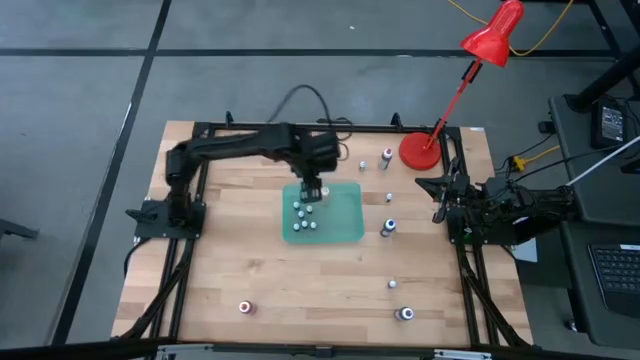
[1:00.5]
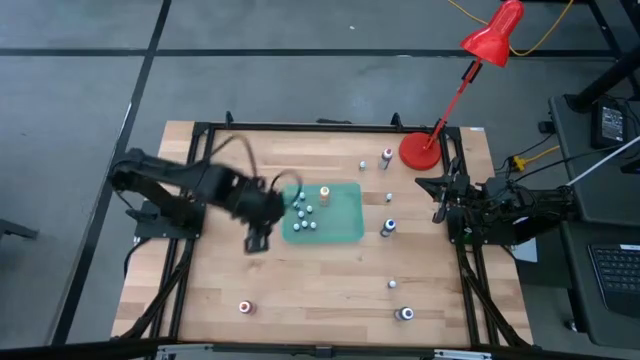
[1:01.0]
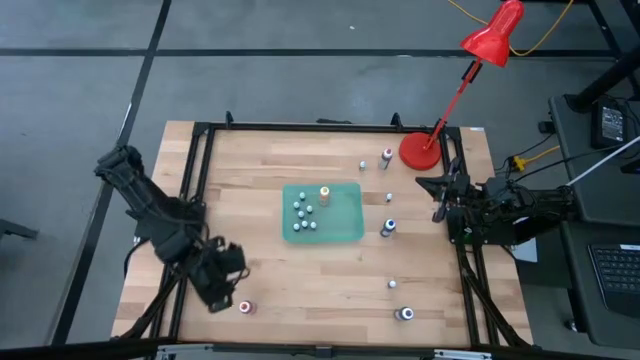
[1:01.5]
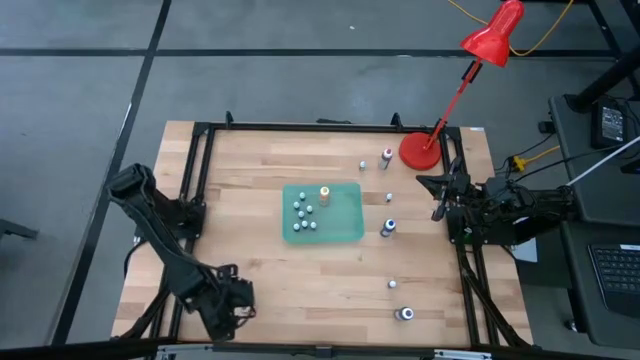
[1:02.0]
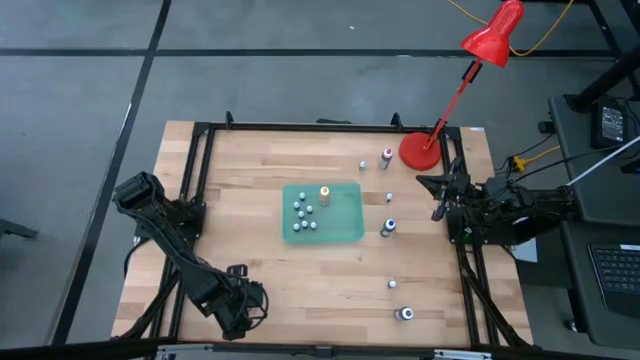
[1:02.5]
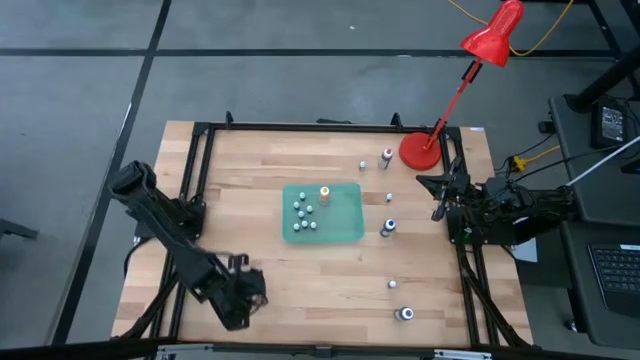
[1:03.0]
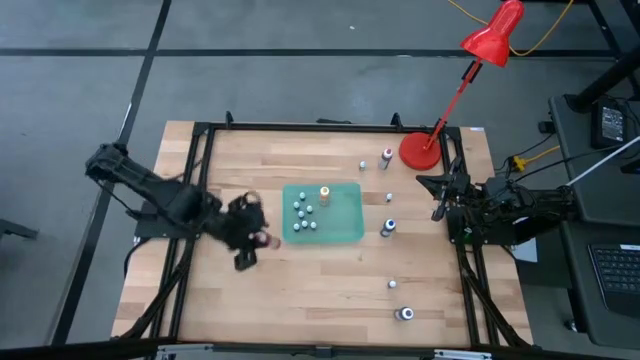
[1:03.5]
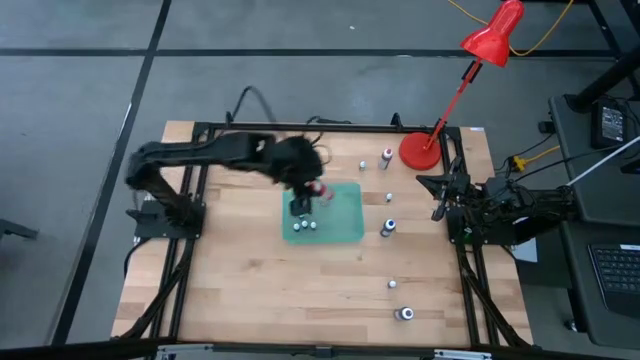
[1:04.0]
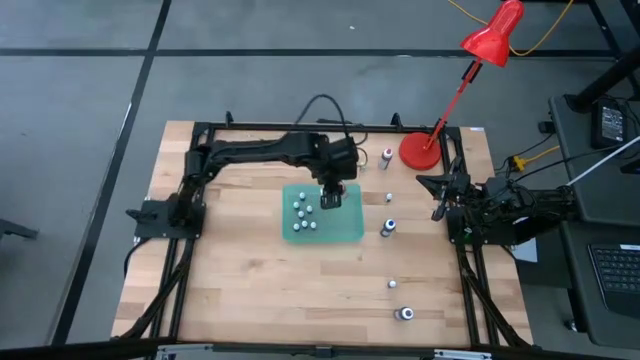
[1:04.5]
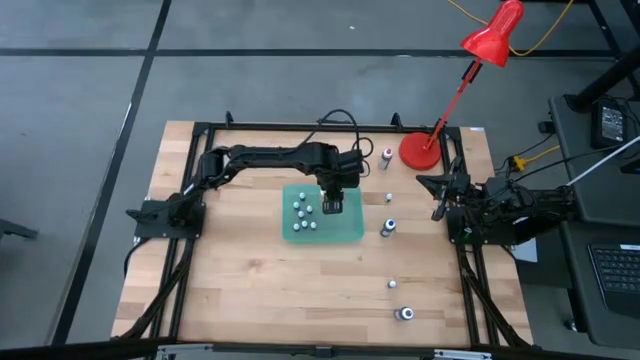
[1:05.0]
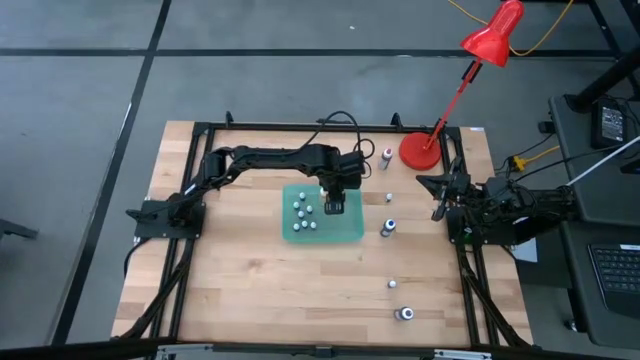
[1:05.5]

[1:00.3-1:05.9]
Task: Pick & Place food coloring
Put the big orange food coloring bottle into the green bin

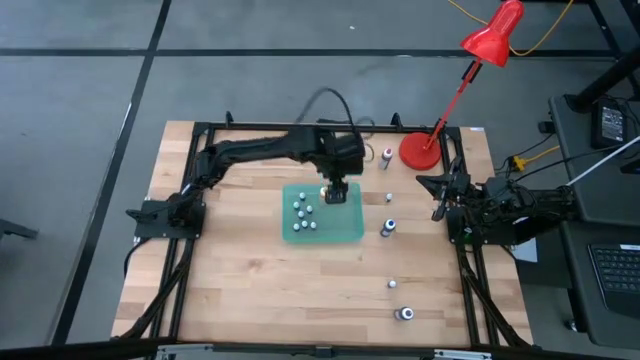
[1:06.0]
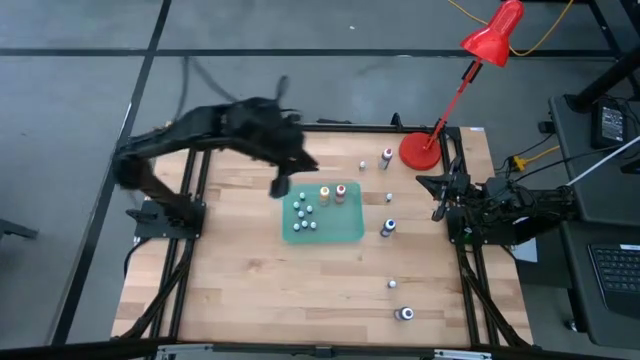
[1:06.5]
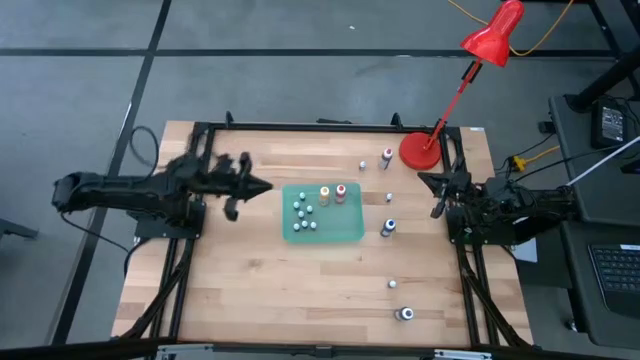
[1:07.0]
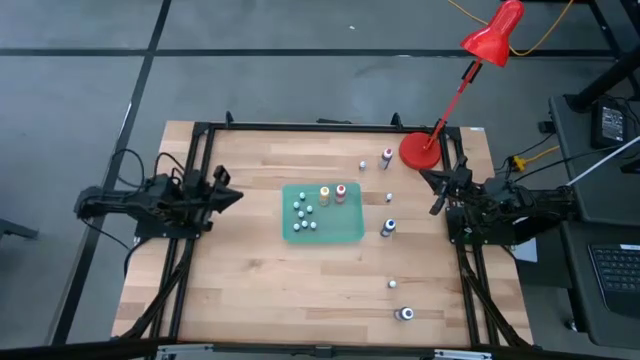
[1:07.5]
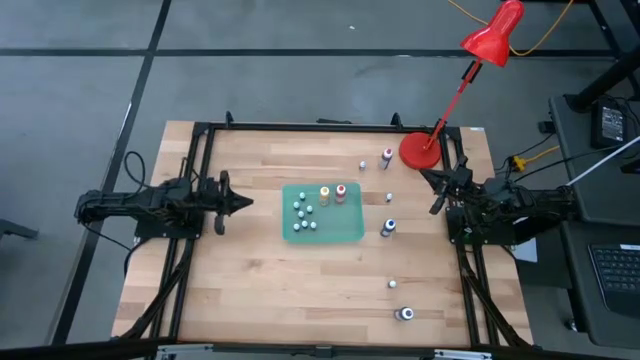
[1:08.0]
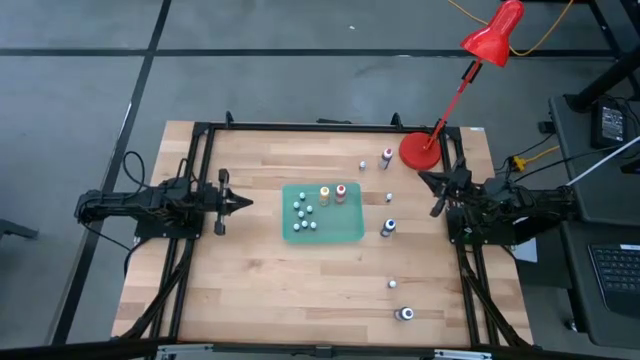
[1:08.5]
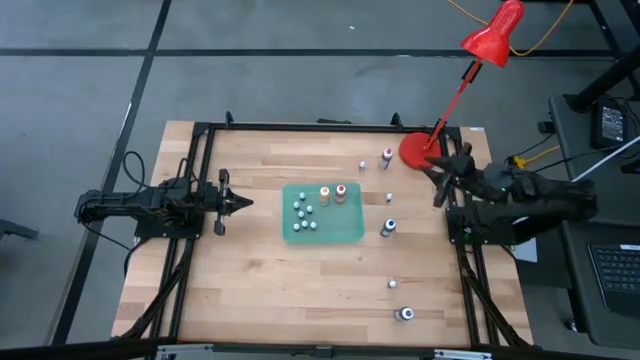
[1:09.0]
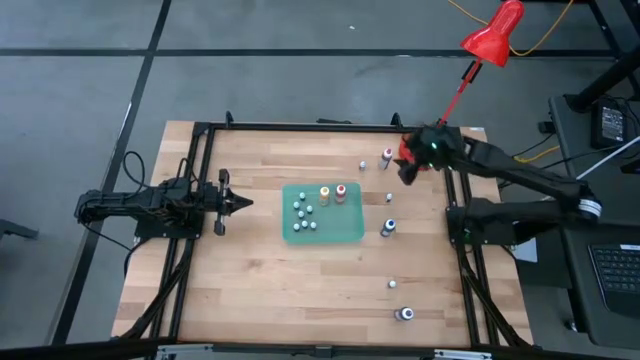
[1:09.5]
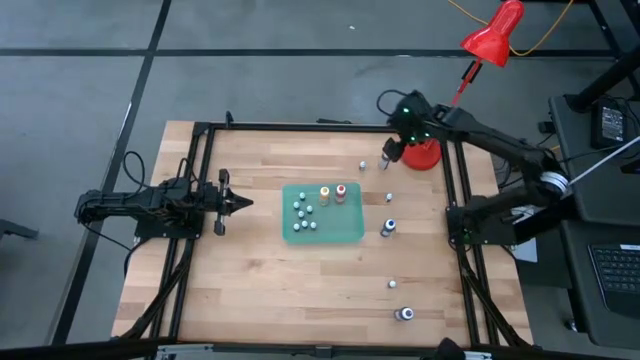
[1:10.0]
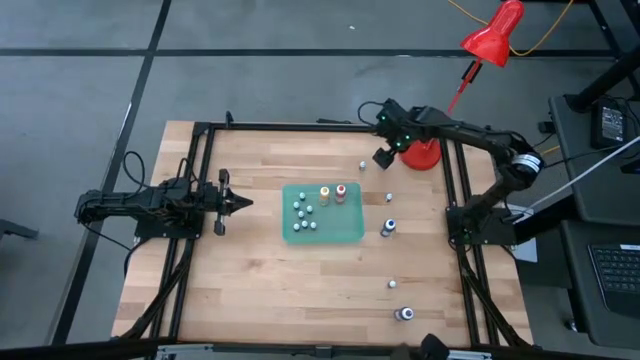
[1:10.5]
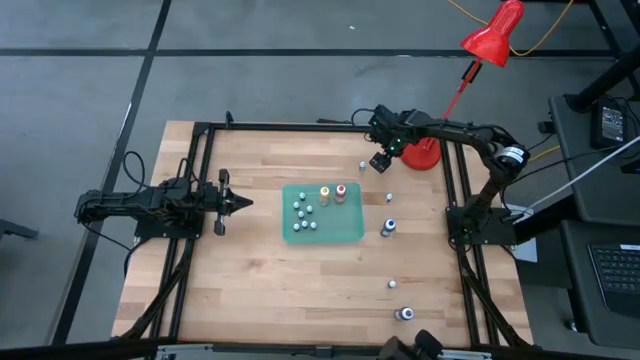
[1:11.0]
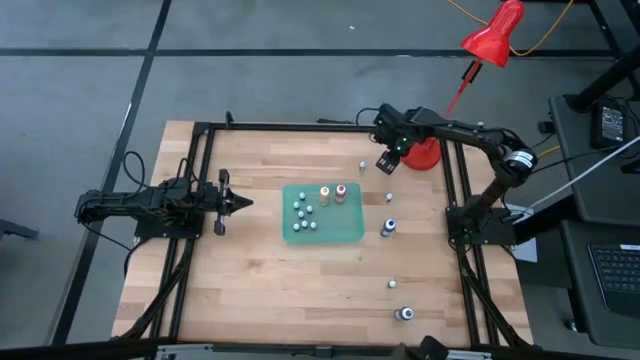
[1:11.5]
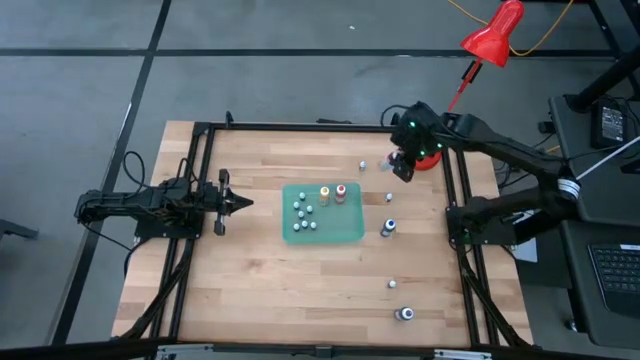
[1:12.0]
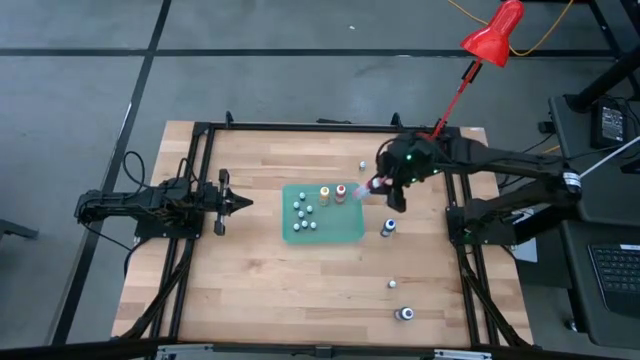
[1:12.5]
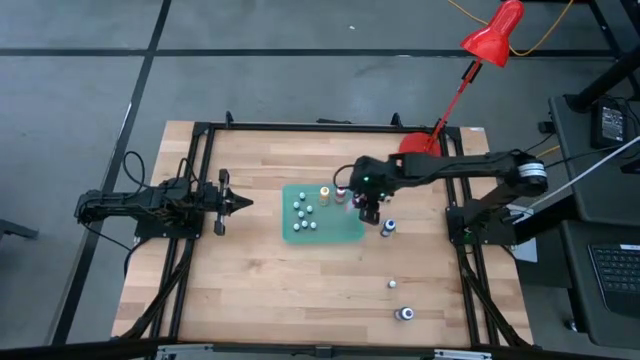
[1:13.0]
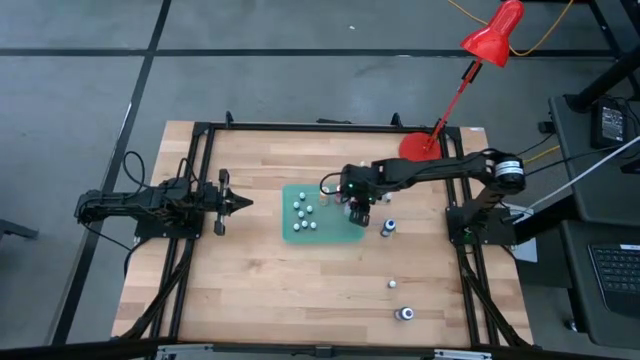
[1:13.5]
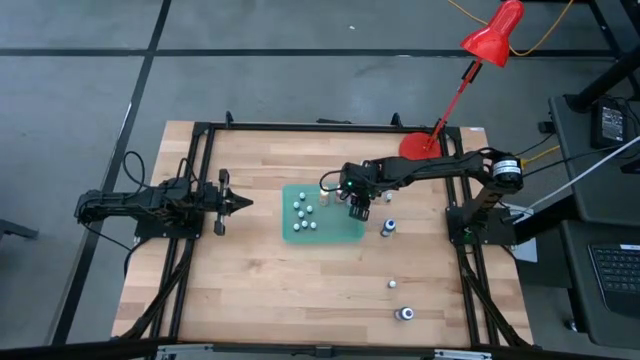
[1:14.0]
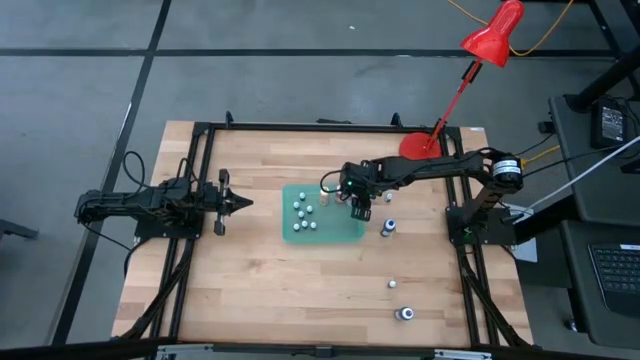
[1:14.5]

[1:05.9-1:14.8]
Put the big pink food coloring bottle into the green bin

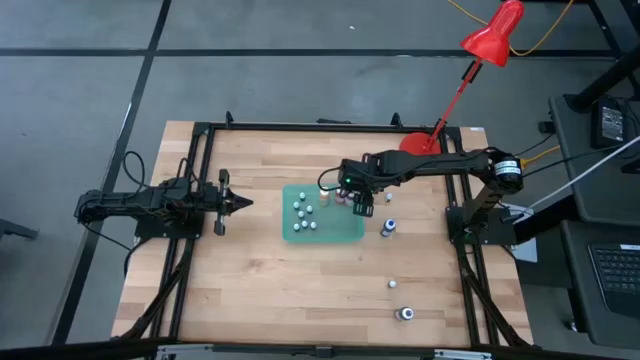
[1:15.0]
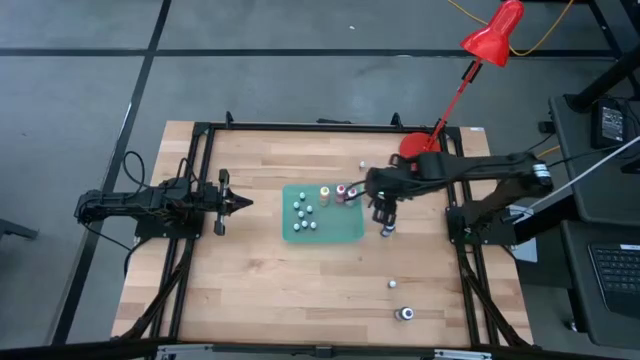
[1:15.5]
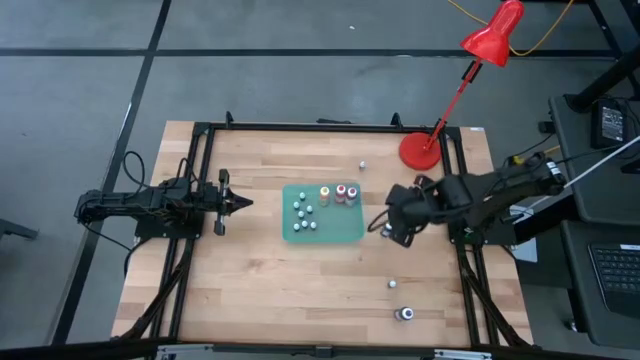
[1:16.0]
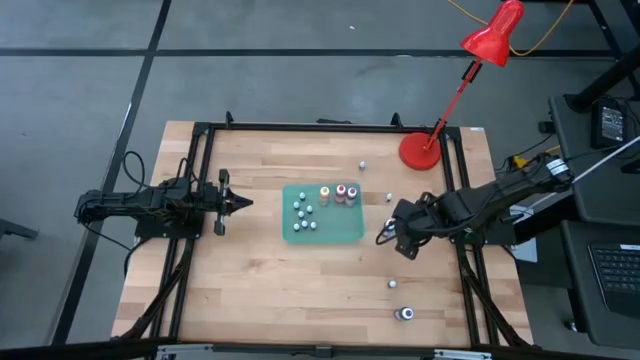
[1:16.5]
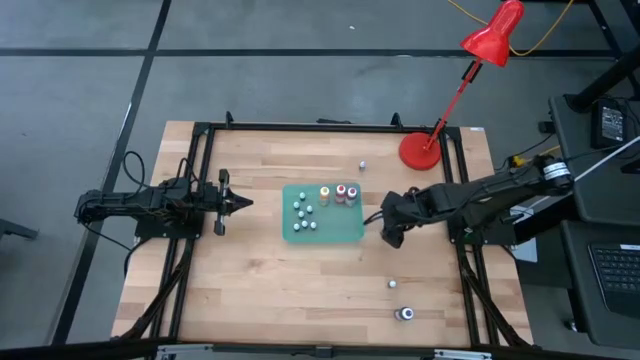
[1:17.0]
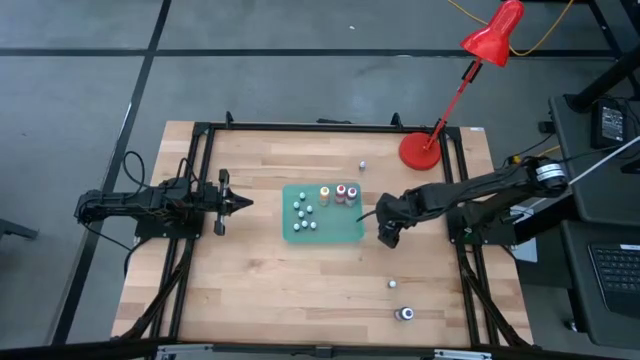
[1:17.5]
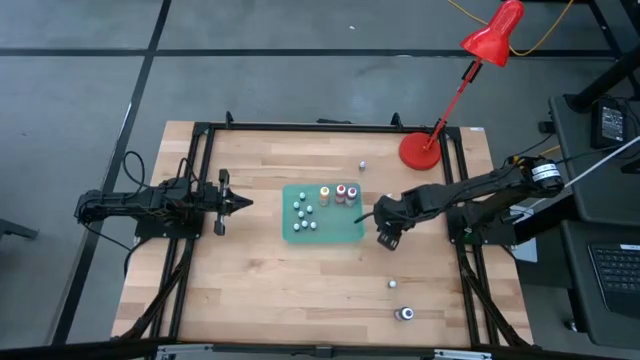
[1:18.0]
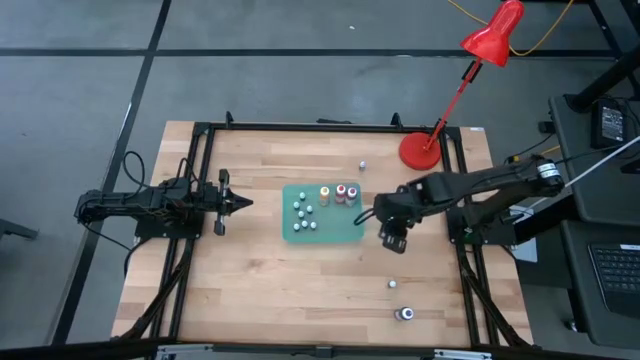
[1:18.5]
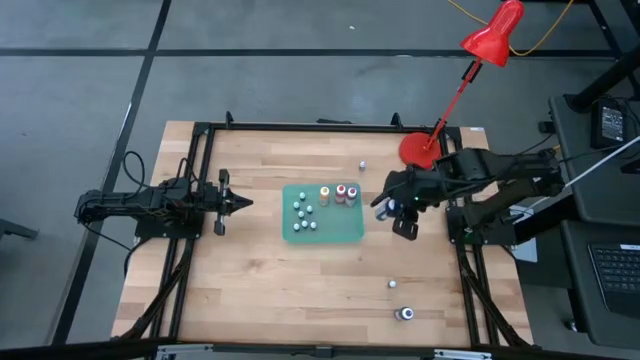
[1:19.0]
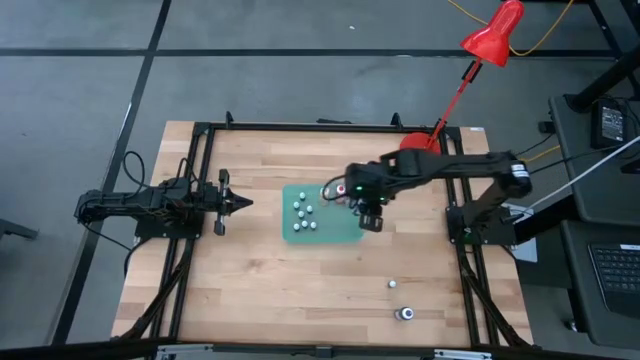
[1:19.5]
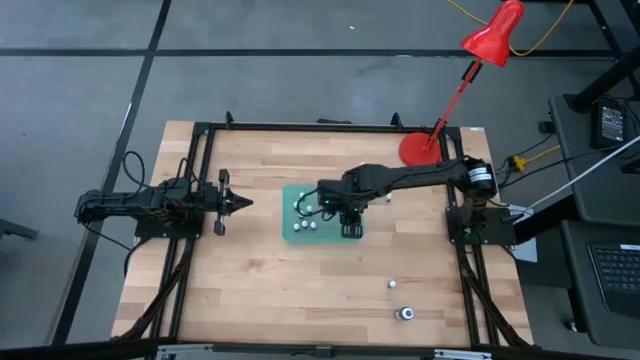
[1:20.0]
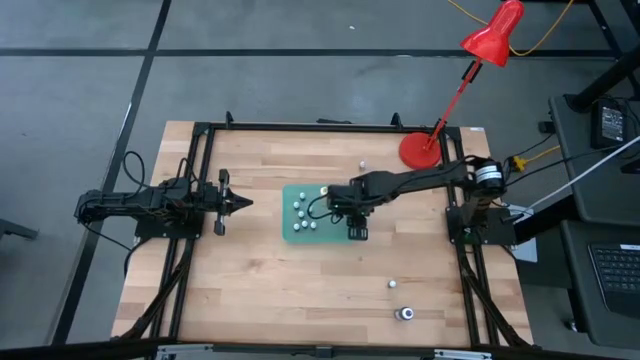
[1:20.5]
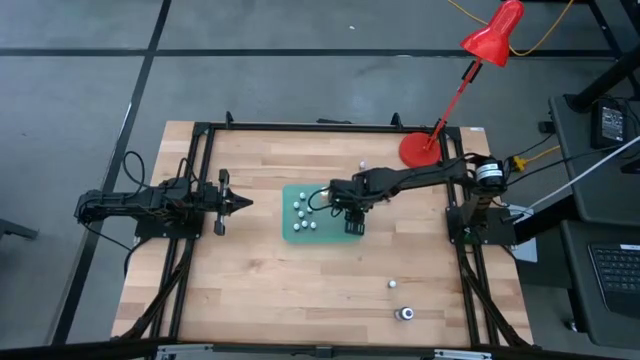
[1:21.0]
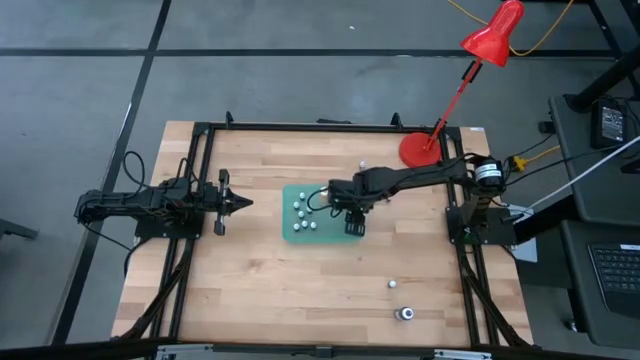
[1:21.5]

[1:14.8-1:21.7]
Put the big blue food coloring bottle into the green bin
